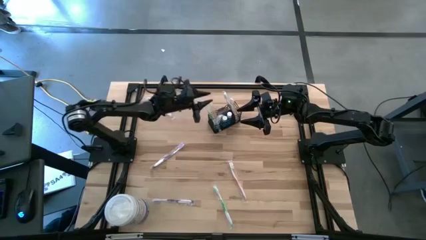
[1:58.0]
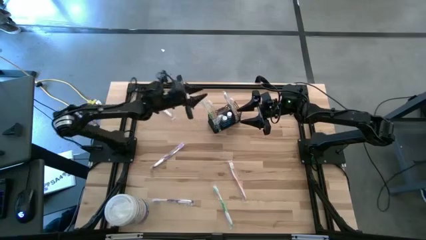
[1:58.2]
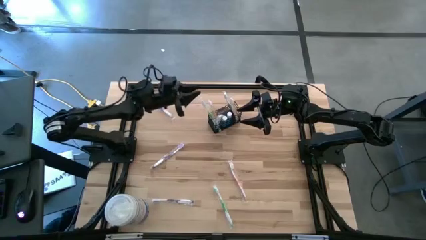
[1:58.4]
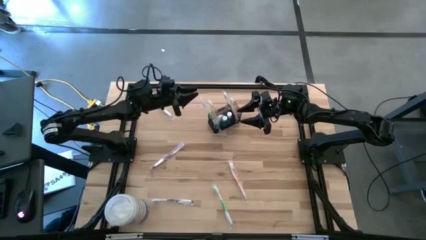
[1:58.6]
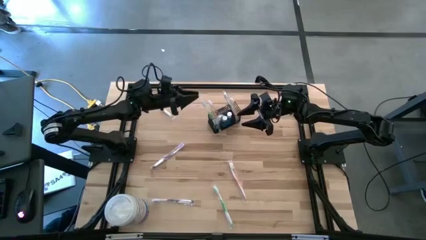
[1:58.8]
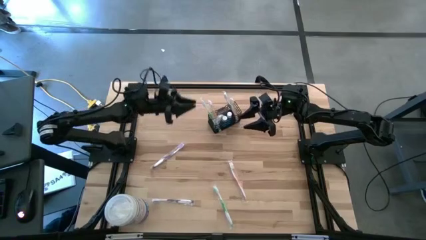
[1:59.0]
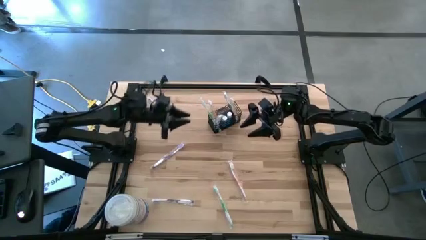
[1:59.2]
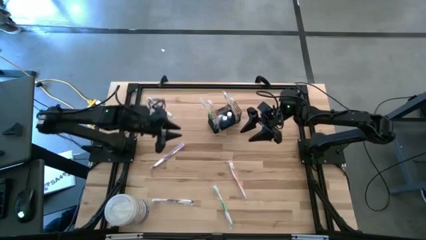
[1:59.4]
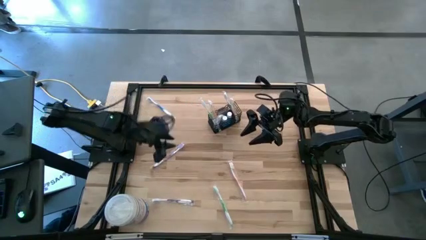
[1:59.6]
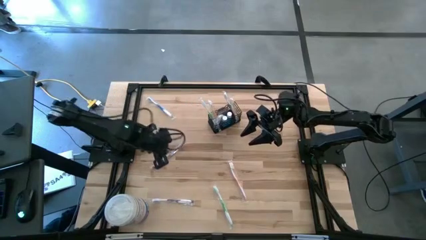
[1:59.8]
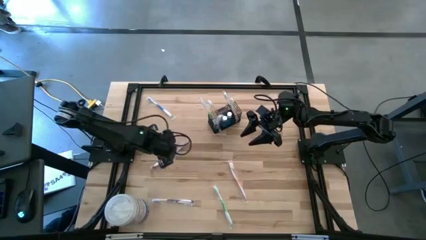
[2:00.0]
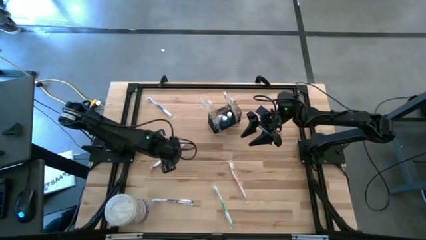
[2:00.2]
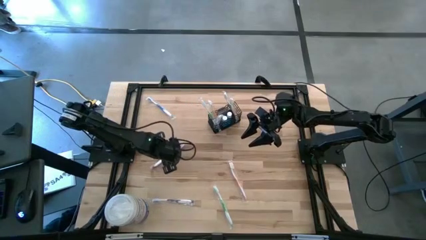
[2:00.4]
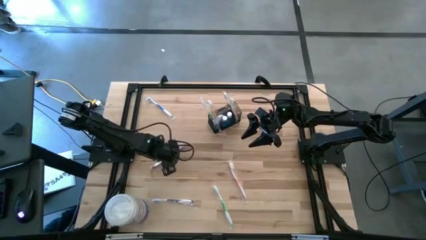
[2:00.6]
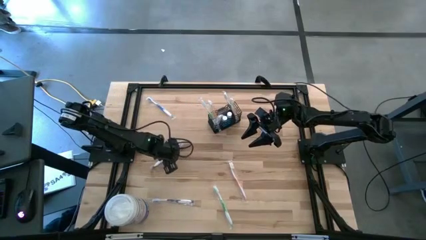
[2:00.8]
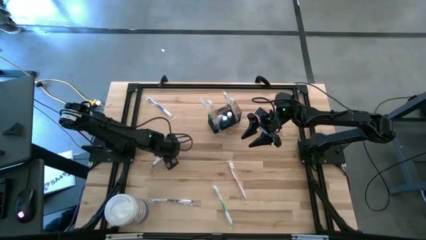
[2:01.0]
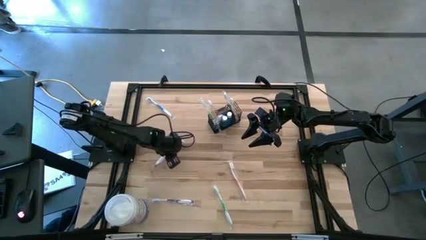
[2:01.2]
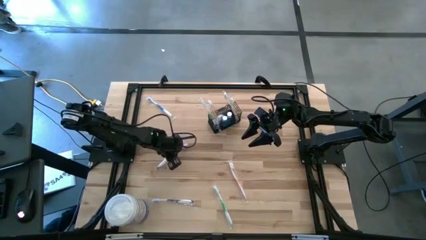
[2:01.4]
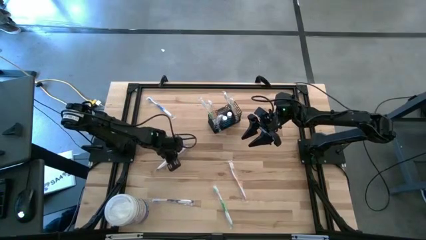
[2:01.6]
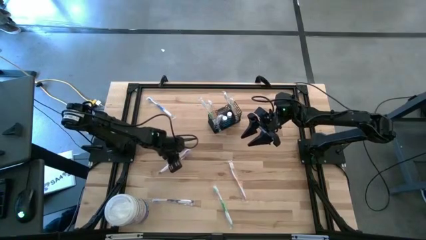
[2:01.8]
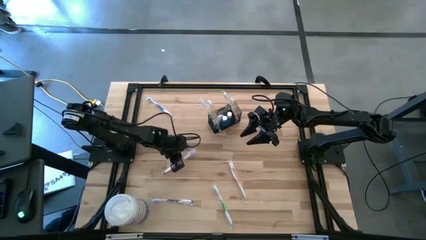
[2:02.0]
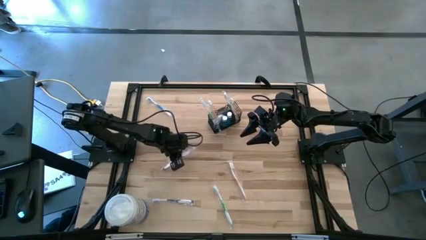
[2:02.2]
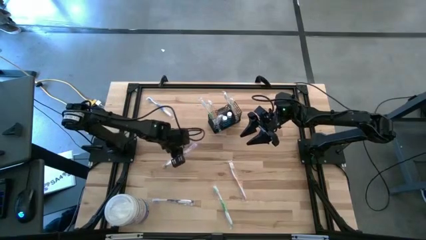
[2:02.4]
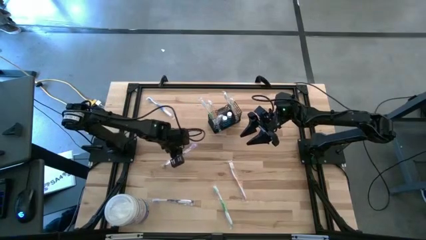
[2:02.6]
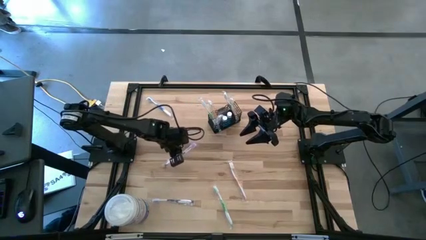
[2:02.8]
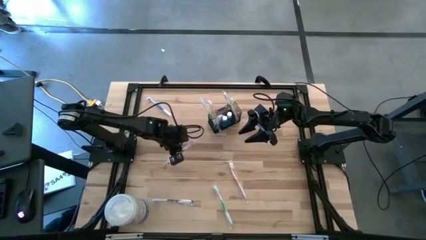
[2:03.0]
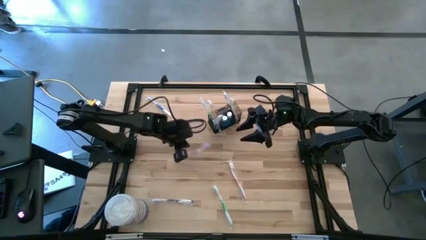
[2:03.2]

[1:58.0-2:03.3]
Task: Pick & Place toothbrushing station
Put the top purple toothbrush into the mesh organizer

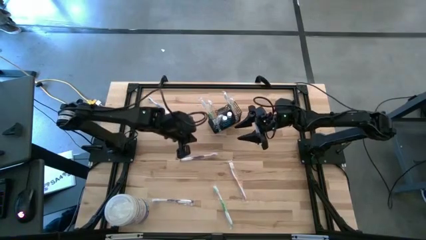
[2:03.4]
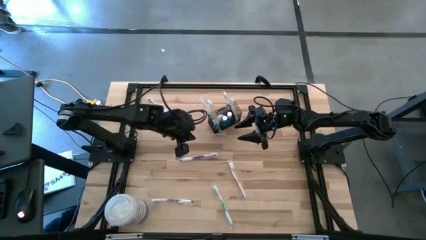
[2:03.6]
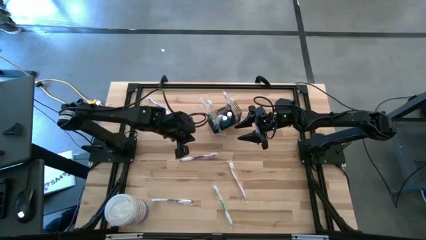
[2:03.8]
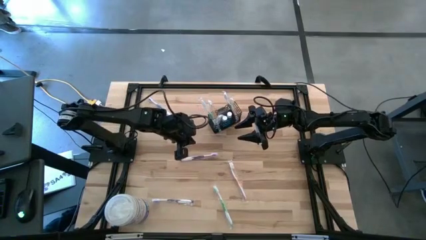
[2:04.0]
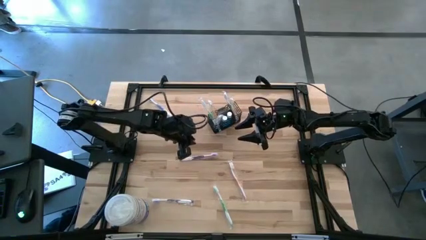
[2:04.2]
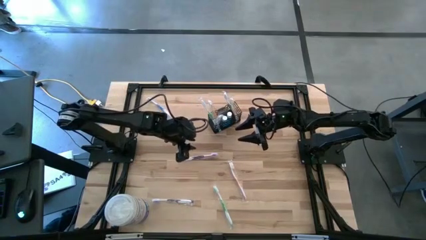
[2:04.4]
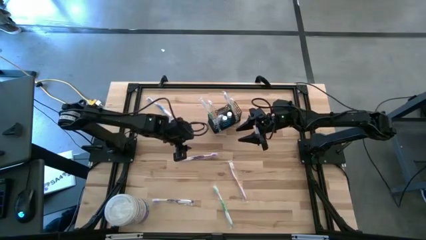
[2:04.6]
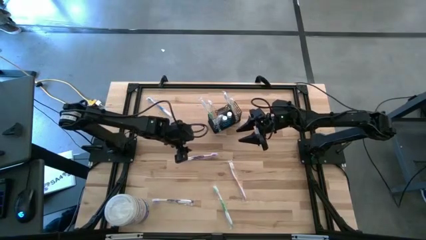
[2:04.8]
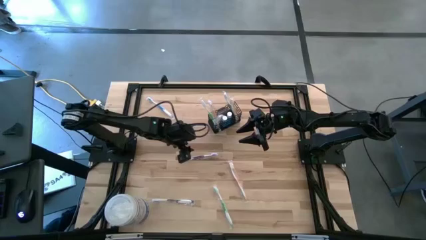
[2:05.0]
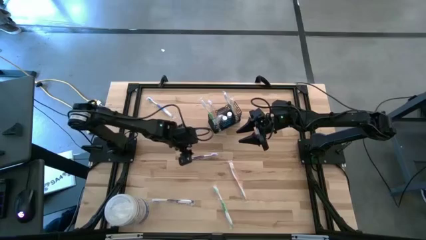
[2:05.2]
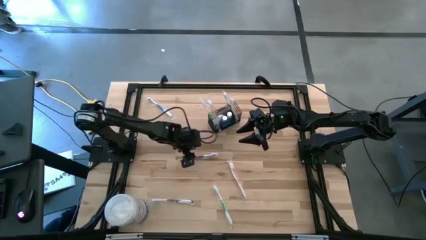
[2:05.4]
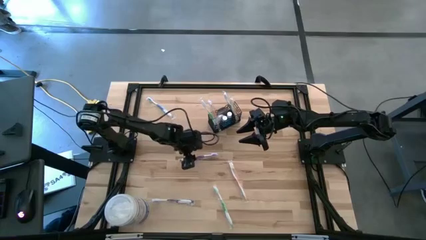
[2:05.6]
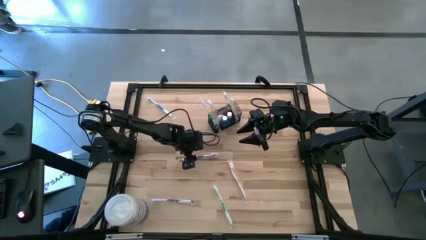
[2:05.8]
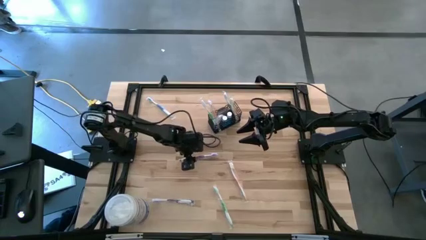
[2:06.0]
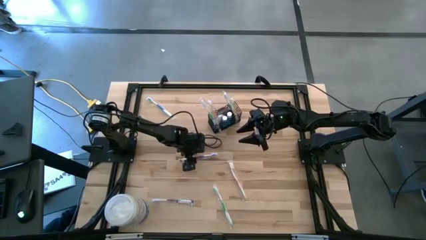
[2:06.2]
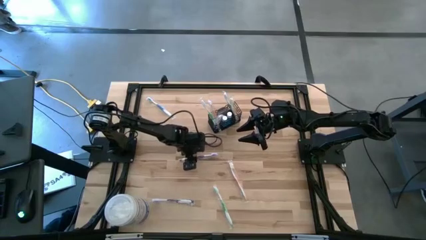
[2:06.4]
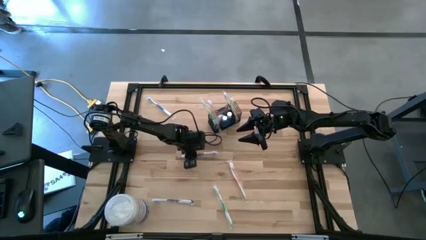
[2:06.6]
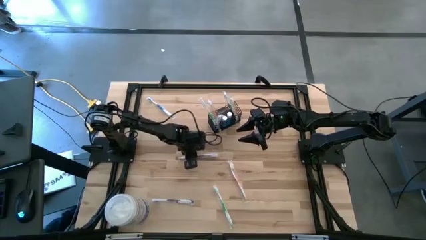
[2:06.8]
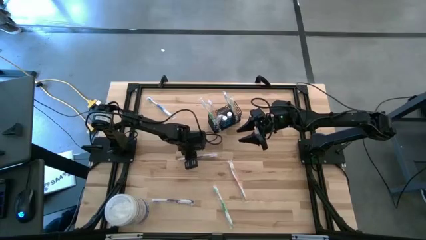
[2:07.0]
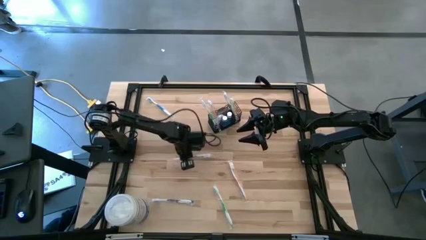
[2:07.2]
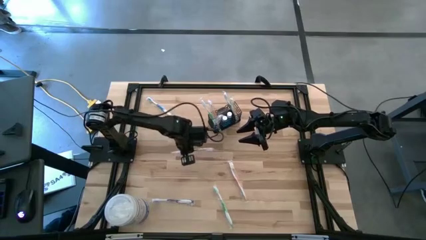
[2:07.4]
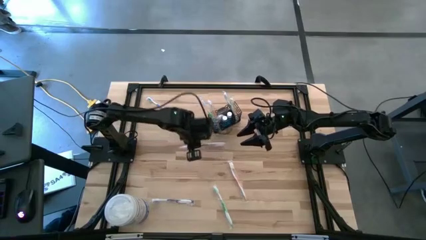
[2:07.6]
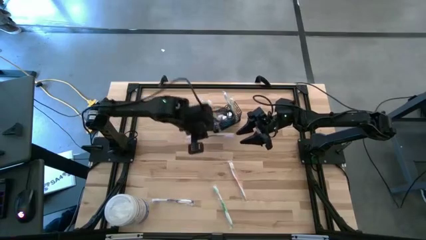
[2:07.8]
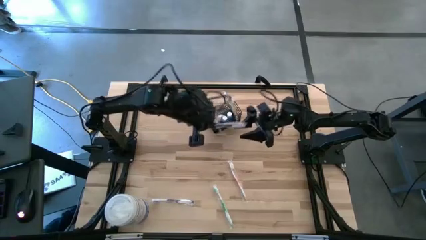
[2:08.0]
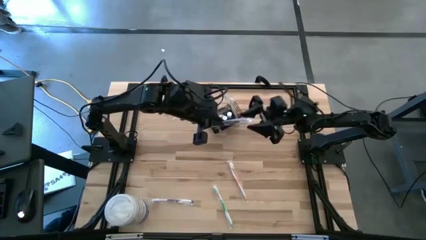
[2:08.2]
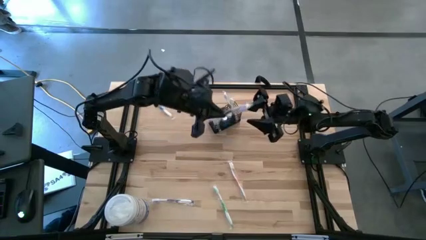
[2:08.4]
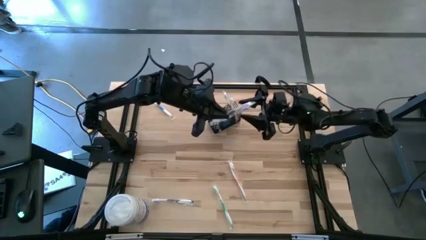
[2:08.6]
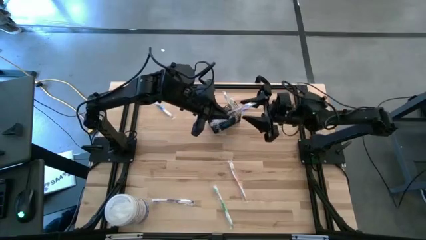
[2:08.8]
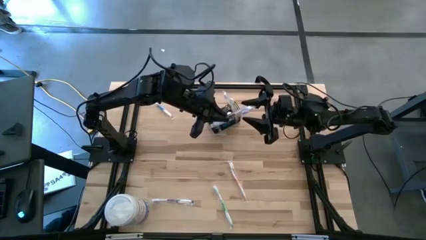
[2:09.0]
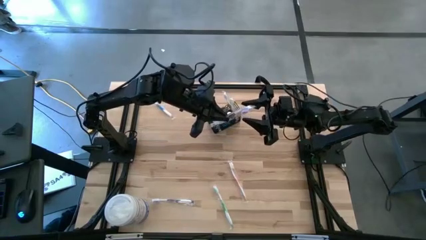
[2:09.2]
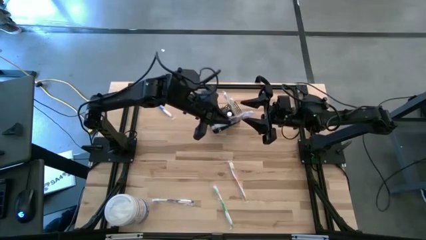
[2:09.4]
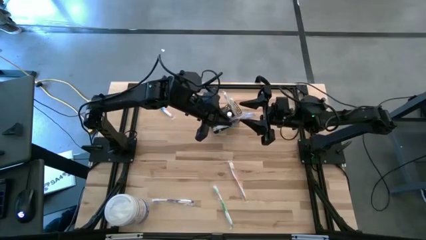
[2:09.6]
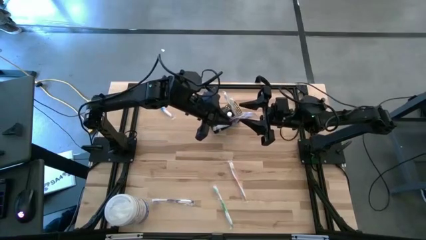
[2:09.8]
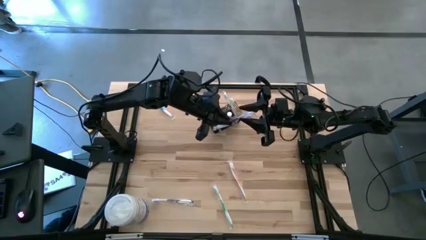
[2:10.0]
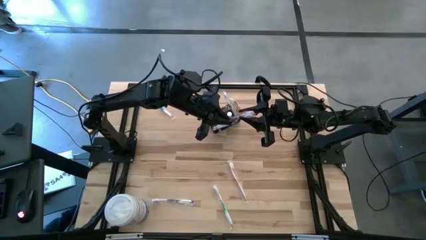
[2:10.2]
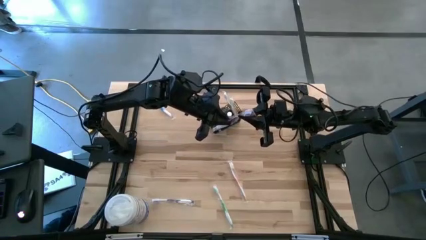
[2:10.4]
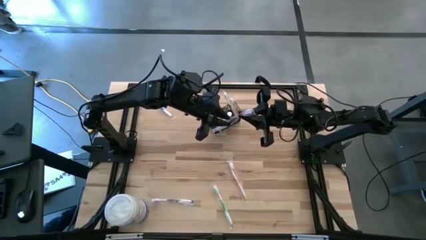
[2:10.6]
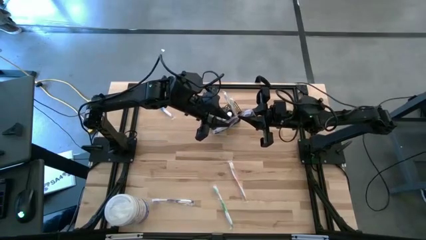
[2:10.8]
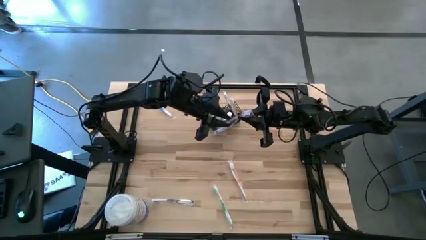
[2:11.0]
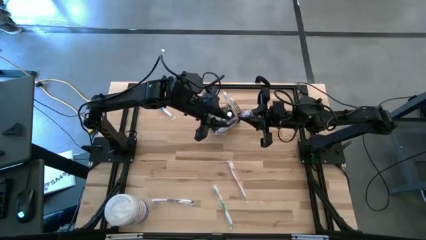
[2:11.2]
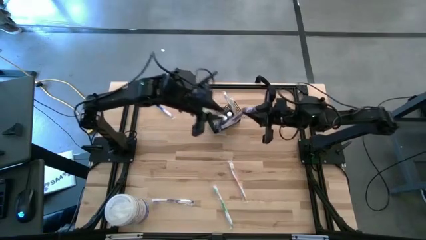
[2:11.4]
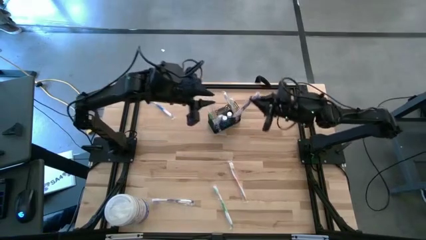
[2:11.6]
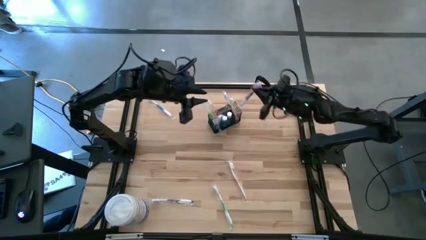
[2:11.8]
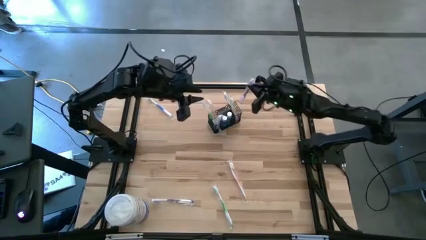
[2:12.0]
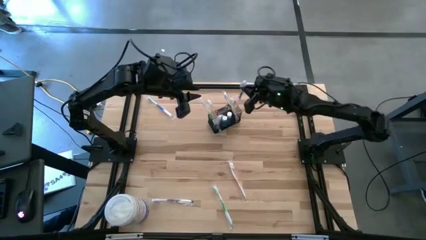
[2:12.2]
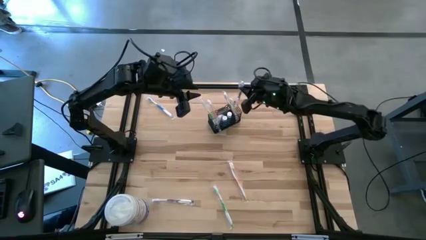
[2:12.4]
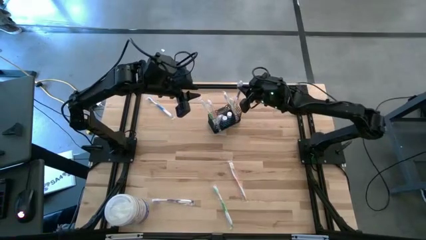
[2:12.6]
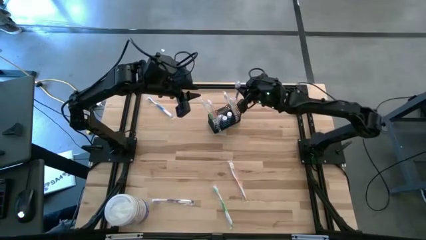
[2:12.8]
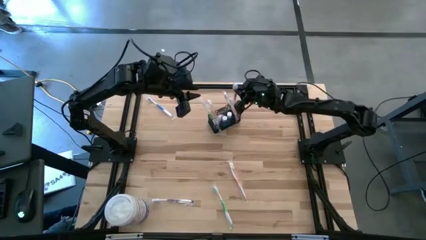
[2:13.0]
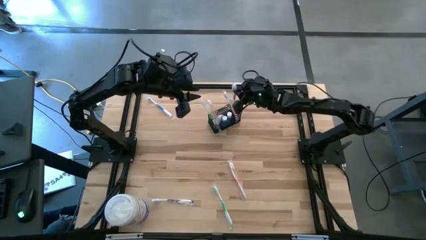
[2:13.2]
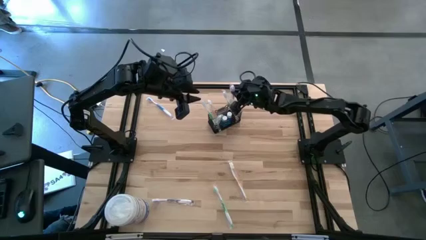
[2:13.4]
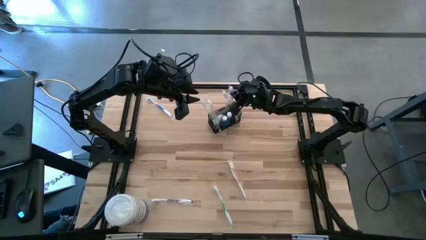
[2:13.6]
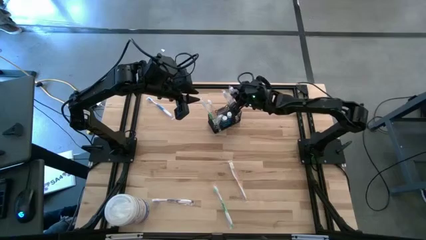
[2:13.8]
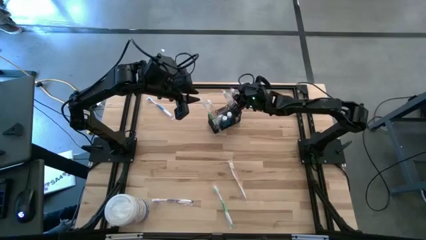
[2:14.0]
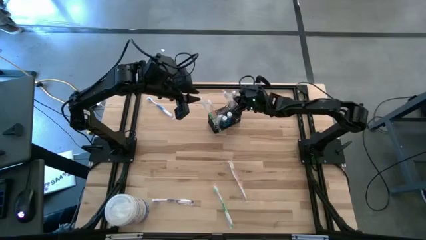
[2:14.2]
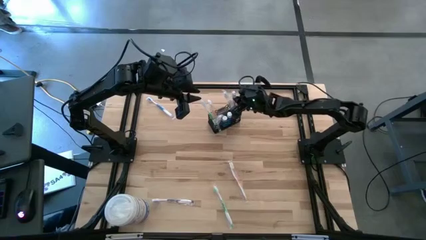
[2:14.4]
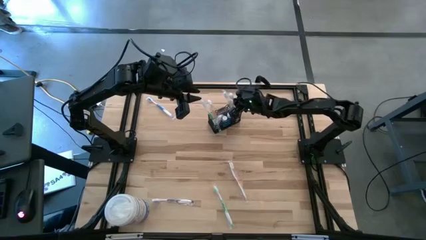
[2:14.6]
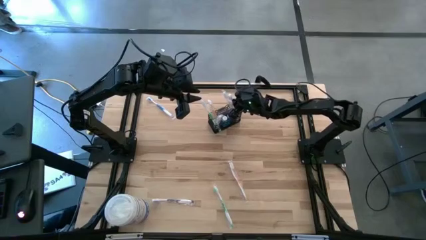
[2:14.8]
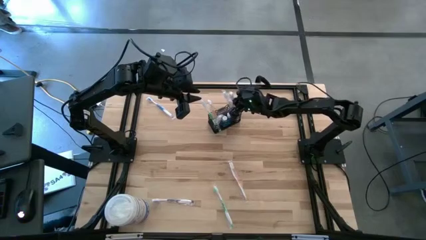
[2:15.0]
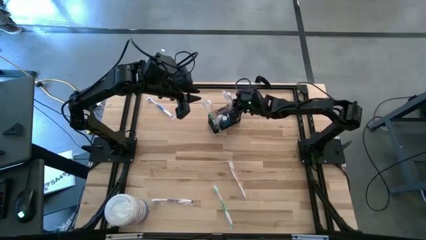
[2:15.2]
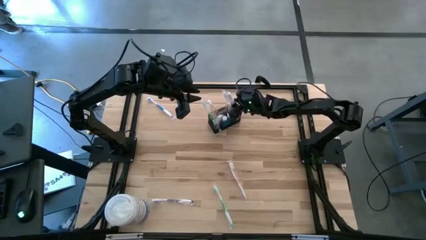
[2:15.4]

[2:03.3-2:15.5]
Put the top purple toothbrush into the mesh organizer
